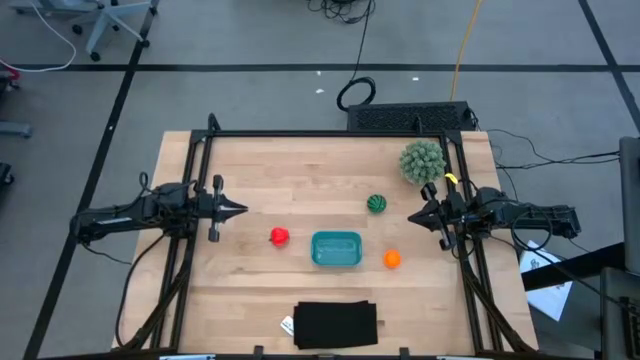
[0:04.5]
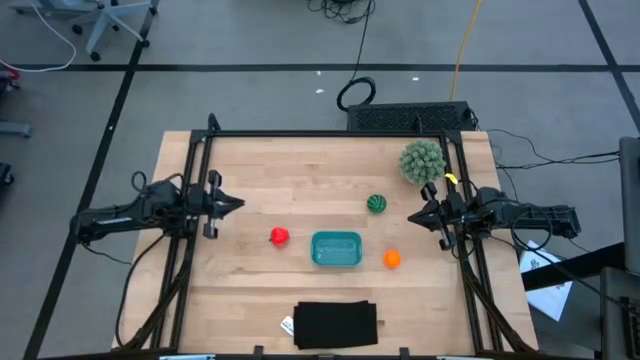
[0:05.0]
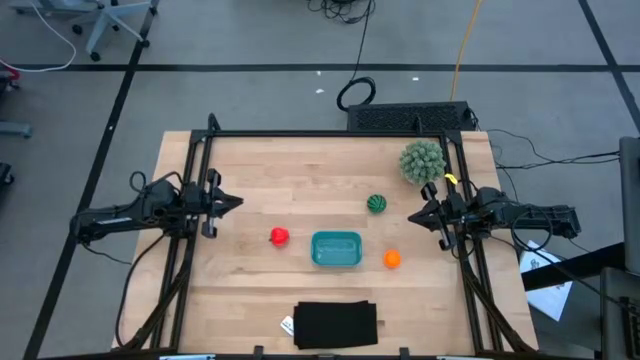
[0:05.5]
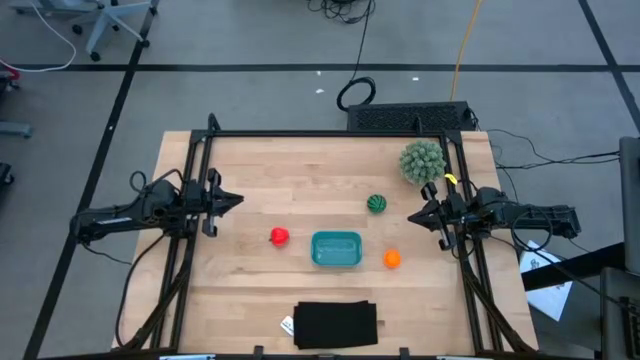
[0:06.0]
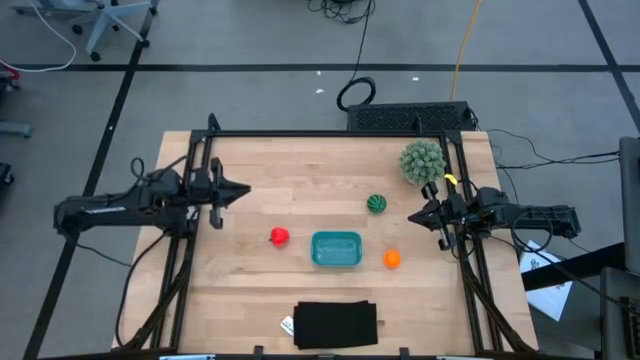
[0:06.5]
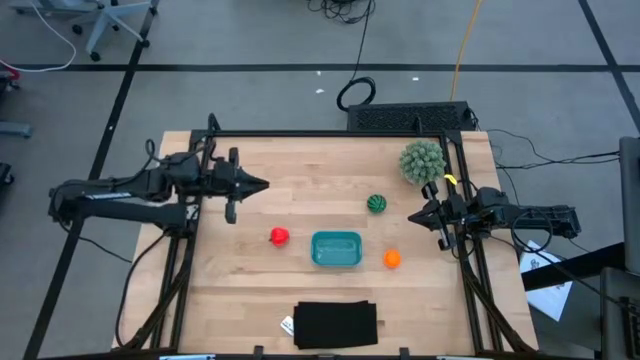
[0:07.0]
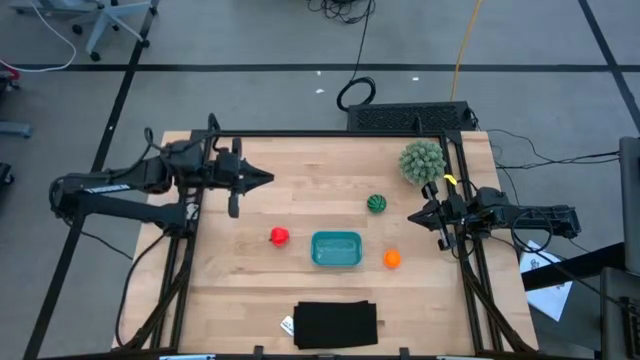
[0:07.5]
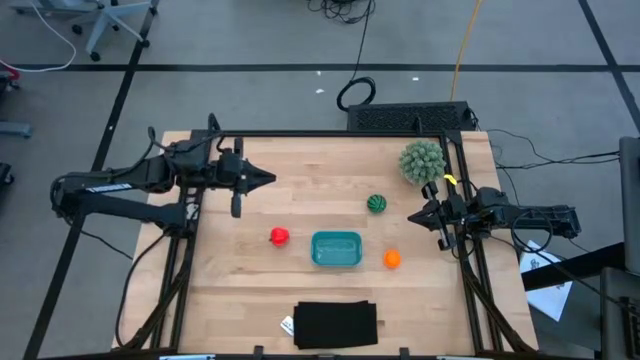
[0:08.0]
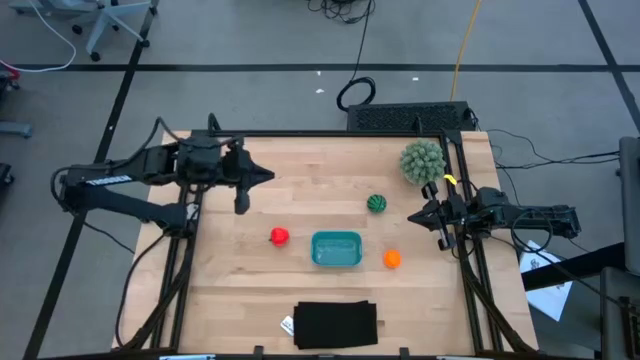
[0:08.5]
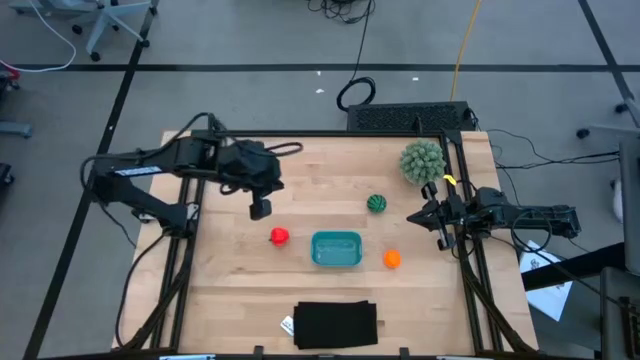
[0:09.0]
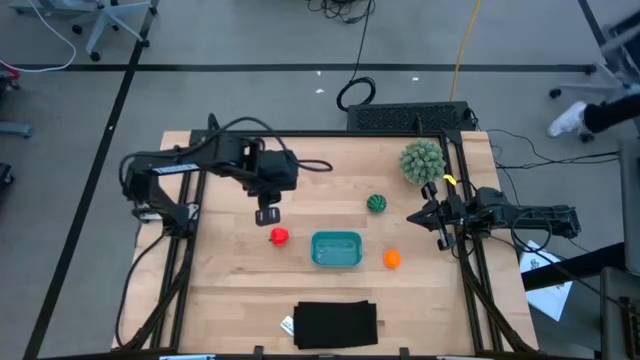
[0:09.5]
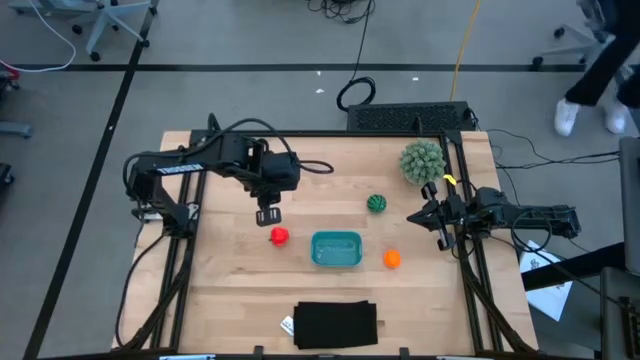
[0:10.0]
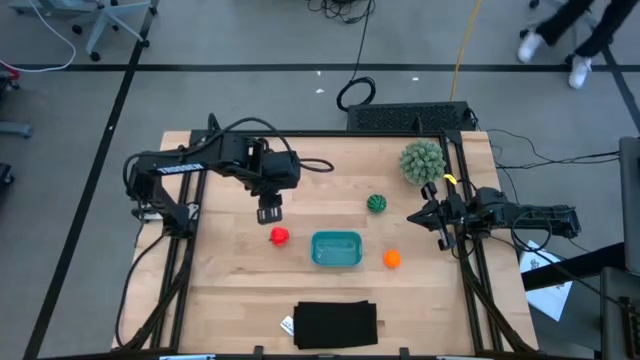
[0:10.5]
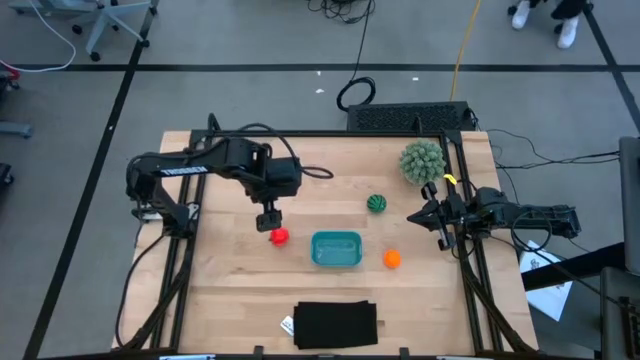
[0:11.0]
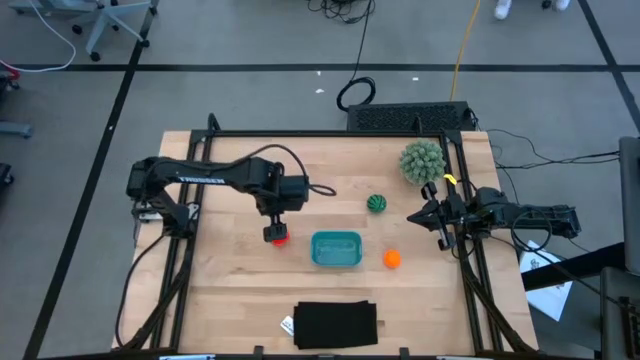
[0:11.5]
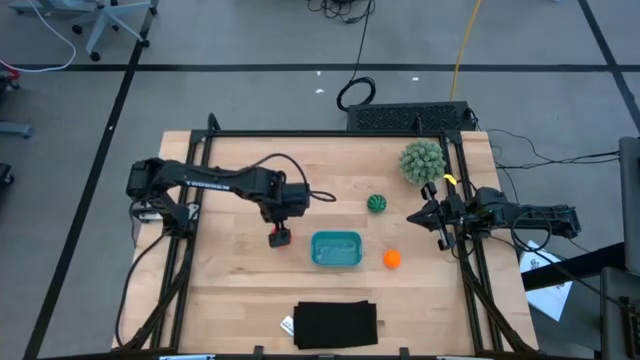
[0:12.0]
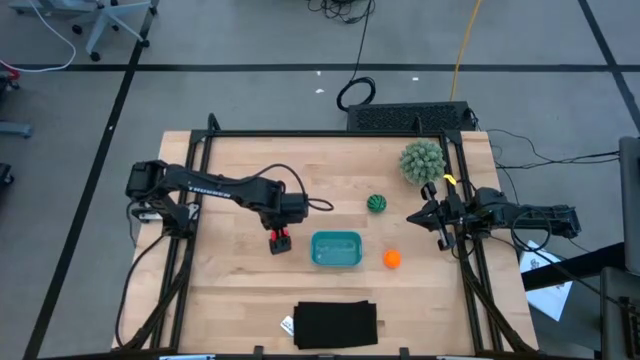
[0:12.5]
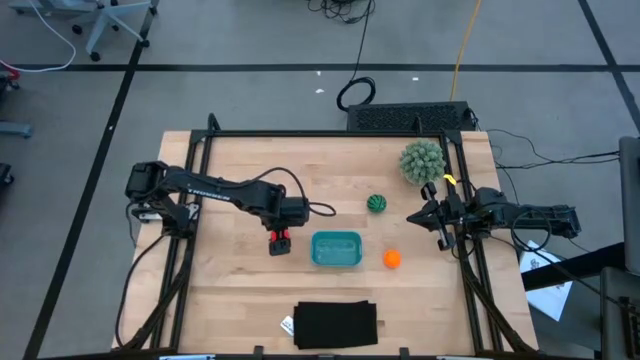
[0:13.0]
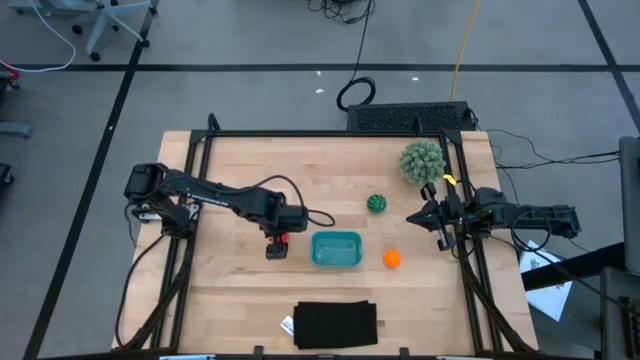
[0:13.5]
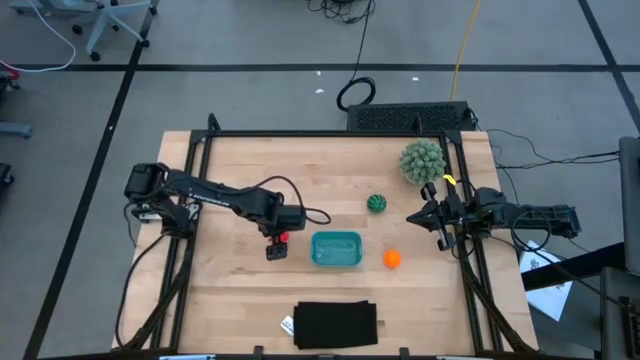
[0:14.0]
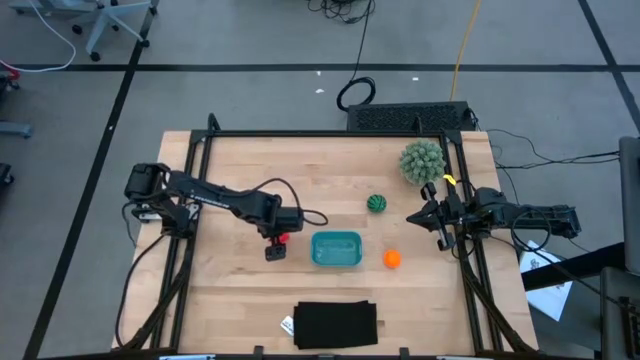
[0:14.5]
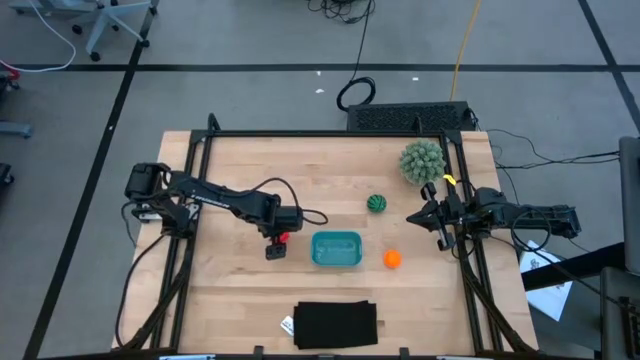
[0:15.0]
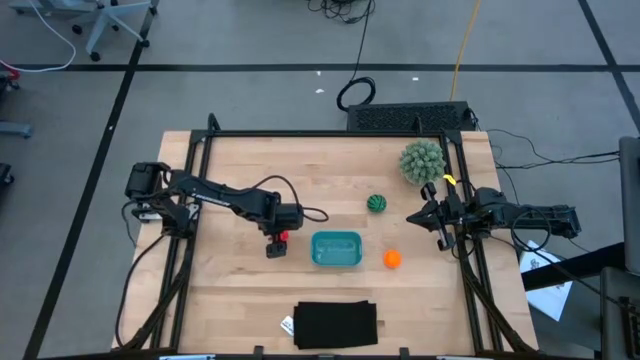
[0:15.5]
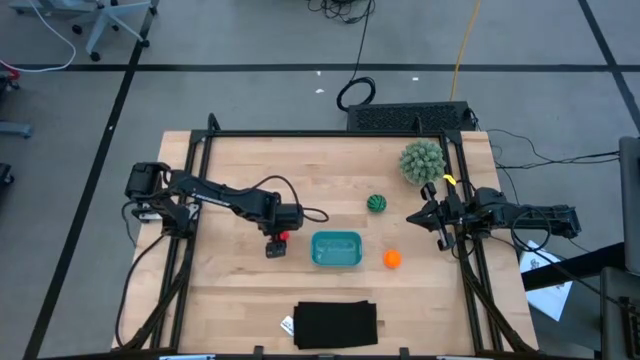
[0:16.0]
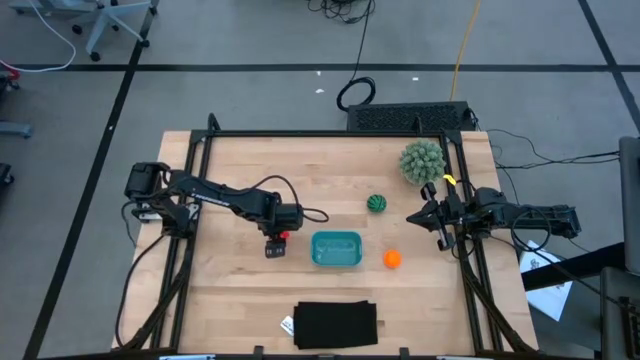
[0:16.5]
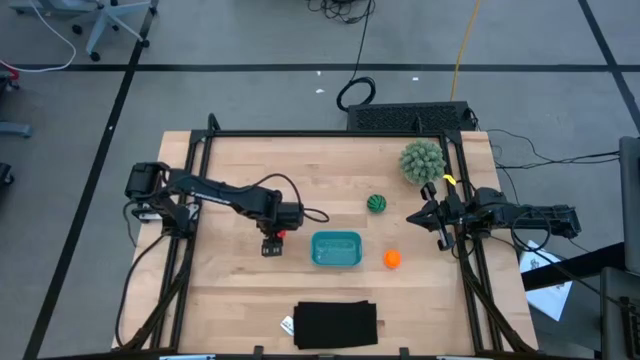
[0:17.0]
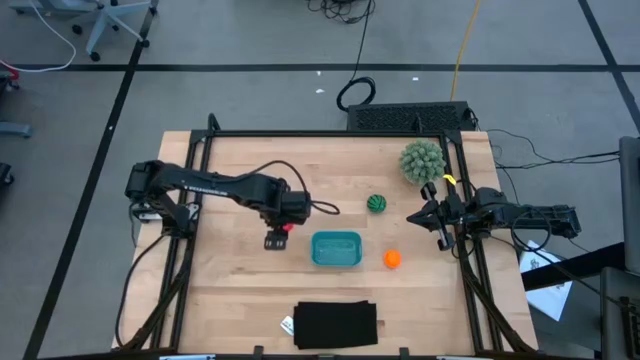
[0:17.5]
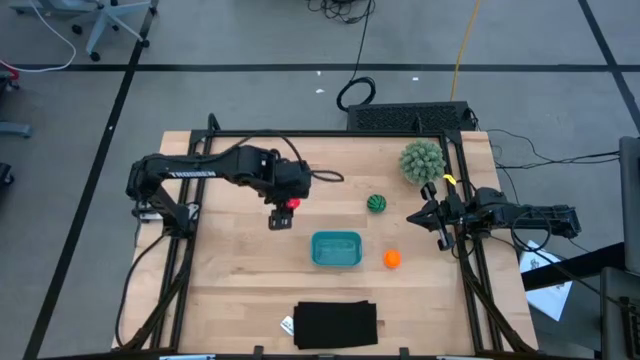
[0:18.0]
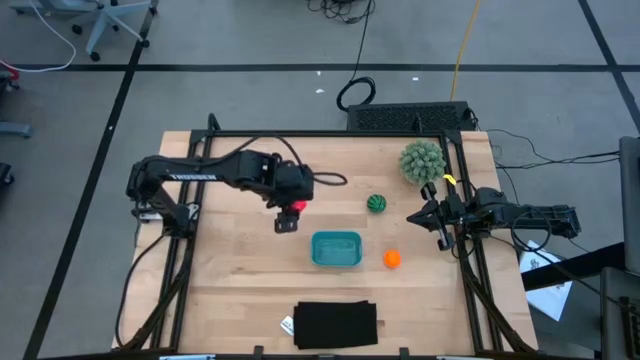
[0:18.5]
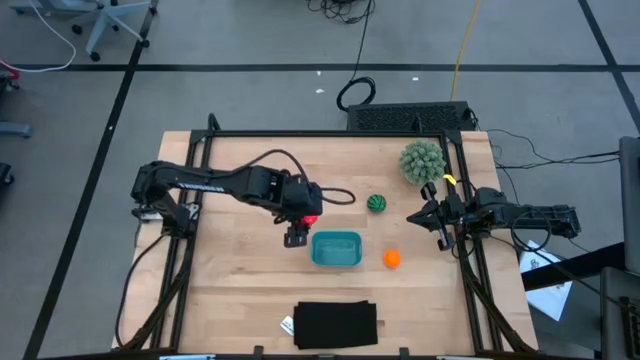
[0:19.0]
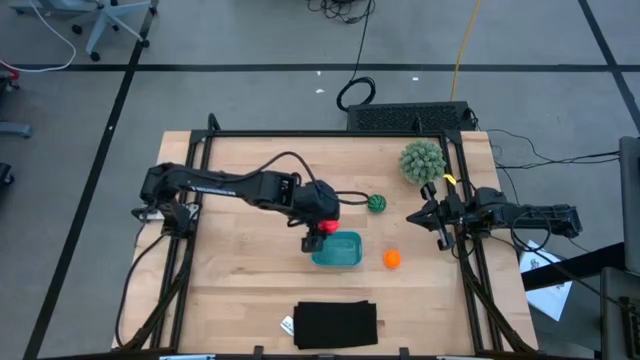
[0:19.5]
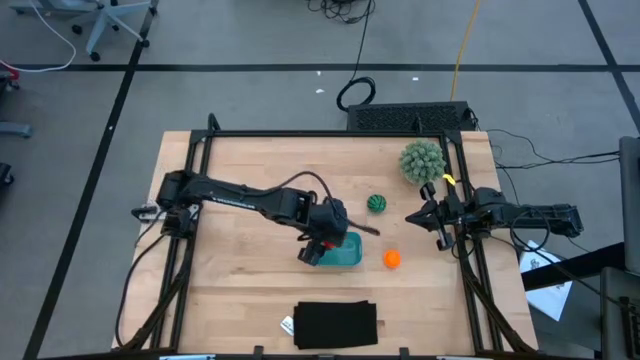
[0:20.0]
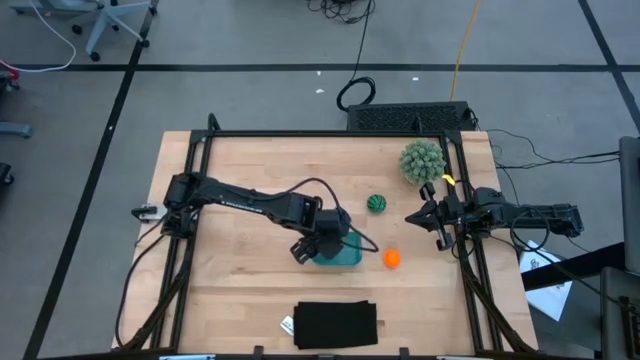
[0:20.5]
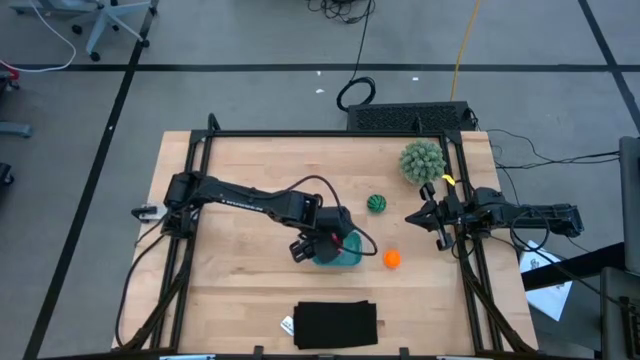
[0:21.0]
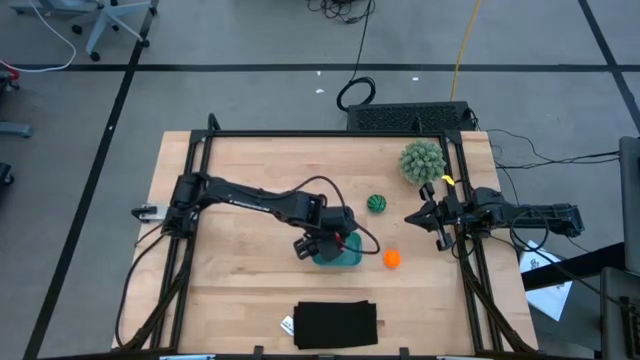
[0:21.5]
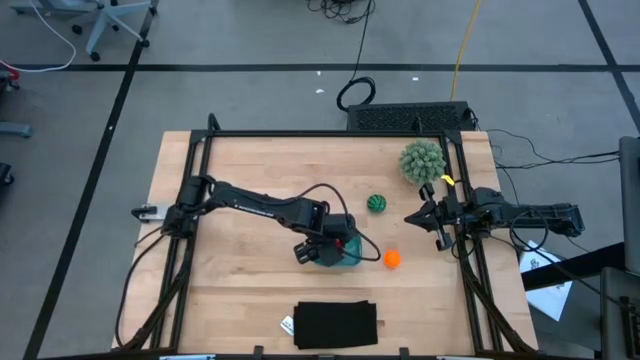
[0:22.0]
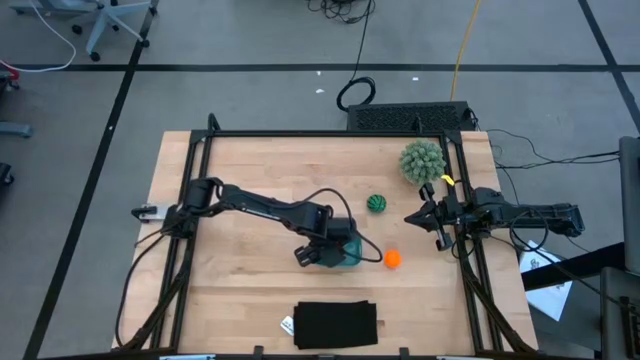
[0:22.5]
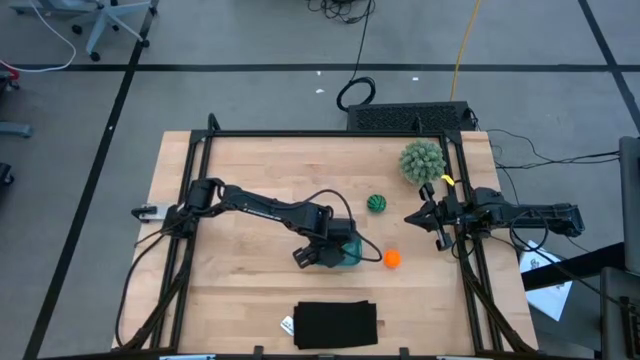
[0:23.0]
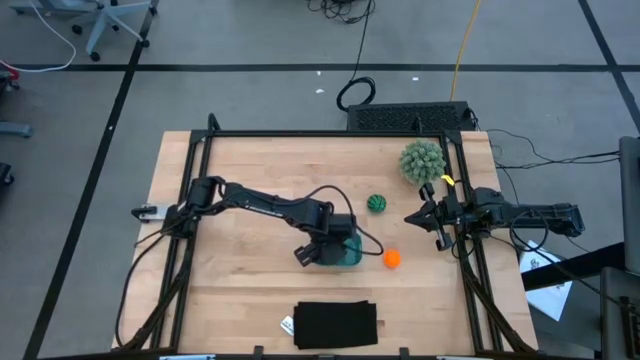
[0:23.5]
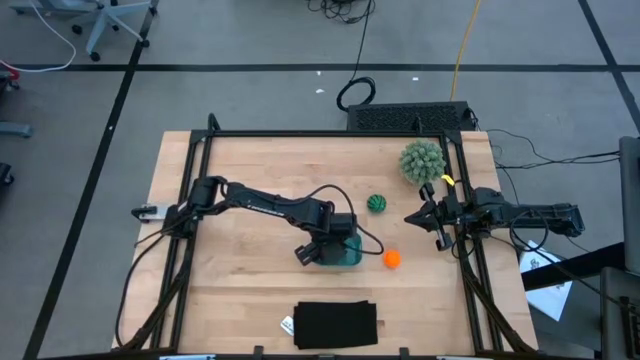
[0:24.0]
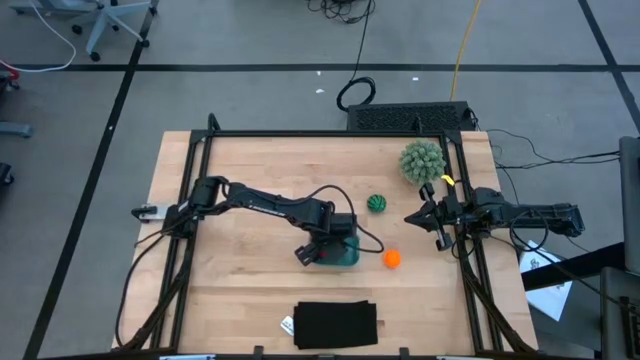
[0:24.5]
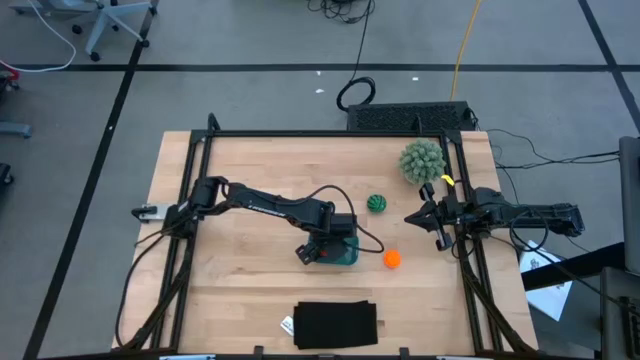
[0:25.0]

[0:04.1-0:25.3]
Task: Pick and placing Produce into tupperware
Put the red apple into the blue bin

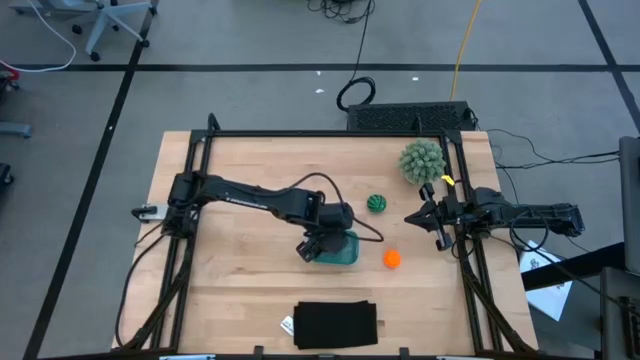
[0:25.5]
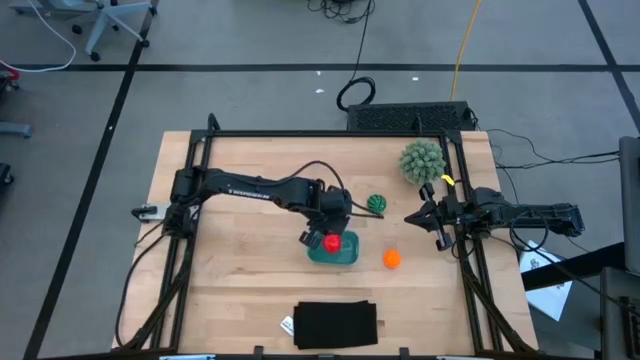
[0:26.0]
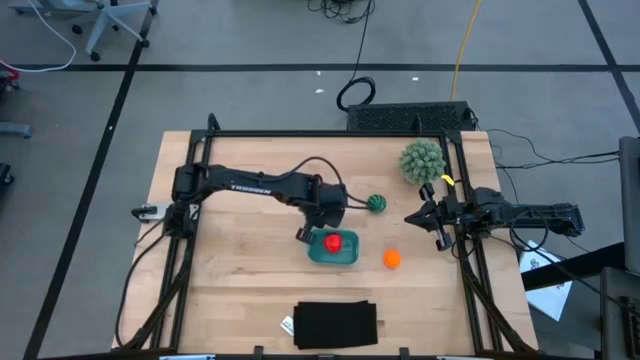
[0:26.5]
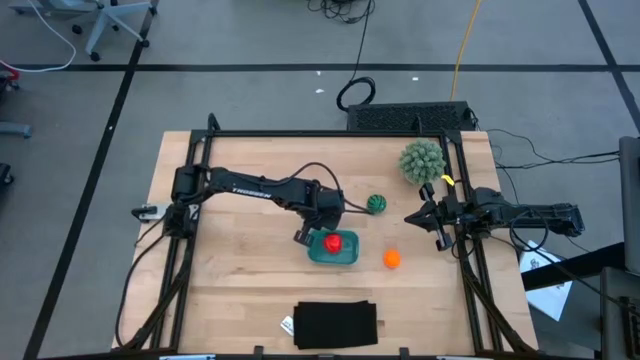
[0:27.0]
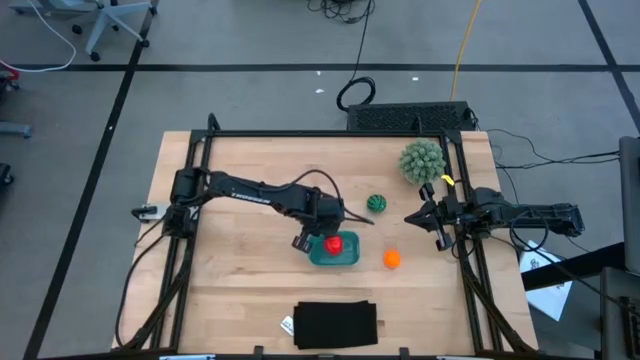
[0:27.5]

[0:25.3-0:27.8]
Adjust the blue bin on the table
